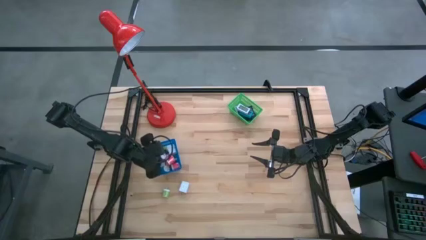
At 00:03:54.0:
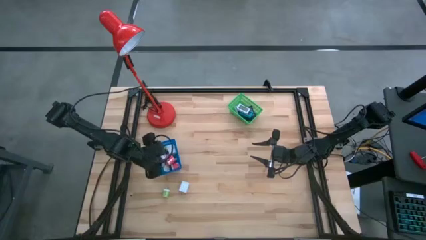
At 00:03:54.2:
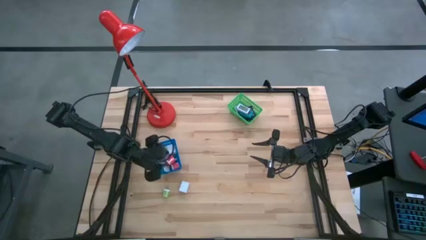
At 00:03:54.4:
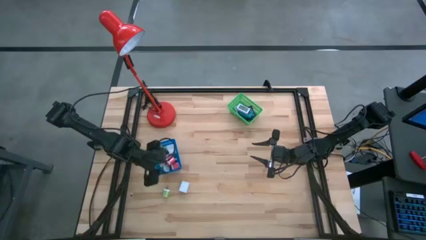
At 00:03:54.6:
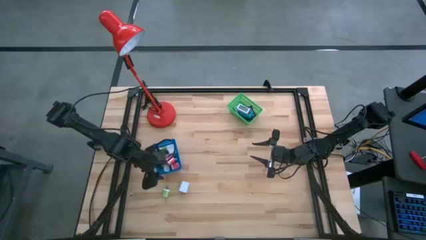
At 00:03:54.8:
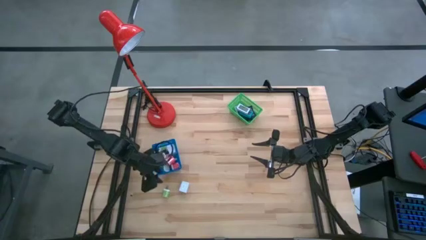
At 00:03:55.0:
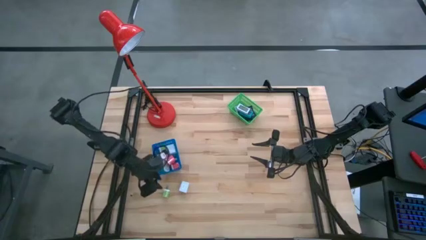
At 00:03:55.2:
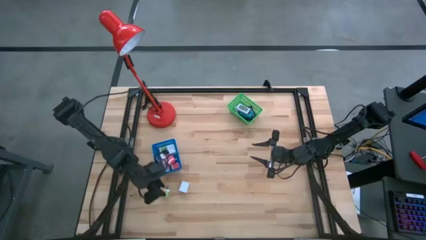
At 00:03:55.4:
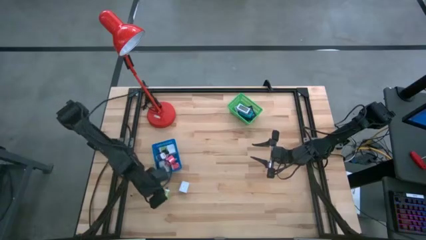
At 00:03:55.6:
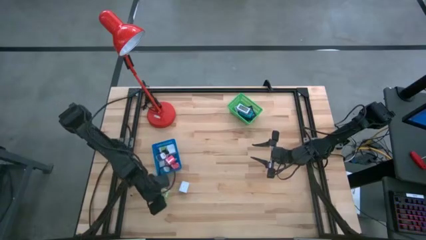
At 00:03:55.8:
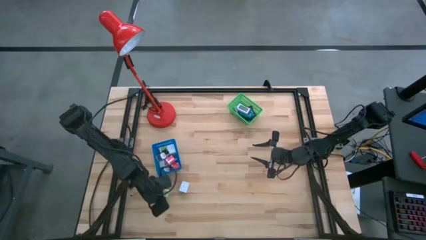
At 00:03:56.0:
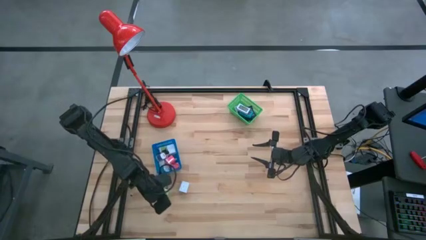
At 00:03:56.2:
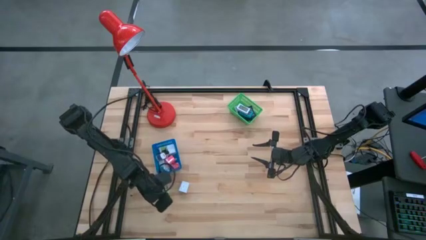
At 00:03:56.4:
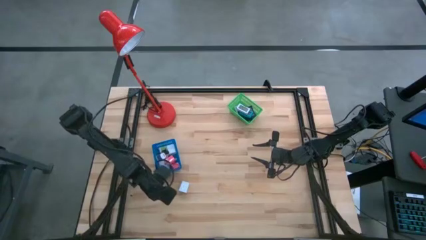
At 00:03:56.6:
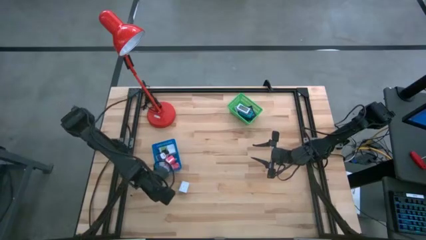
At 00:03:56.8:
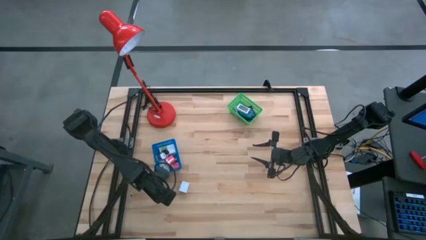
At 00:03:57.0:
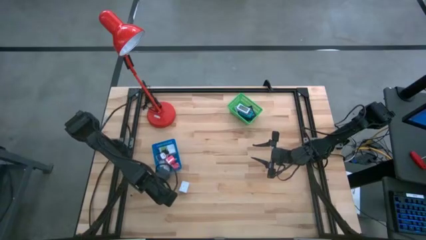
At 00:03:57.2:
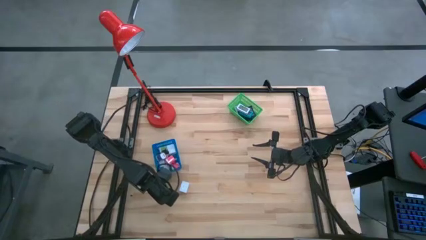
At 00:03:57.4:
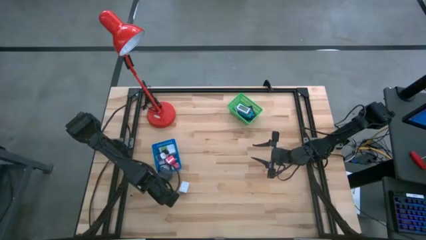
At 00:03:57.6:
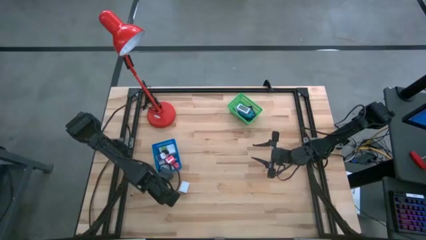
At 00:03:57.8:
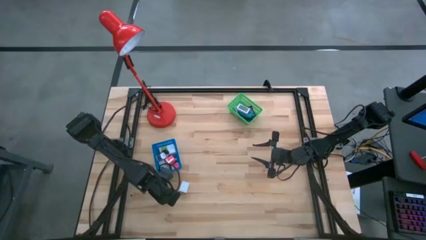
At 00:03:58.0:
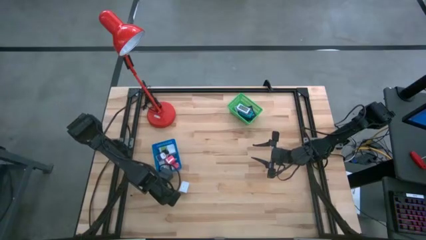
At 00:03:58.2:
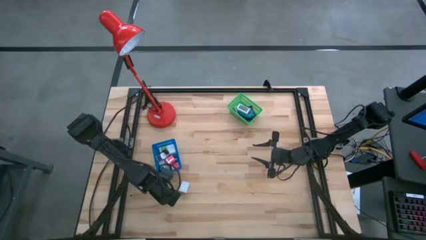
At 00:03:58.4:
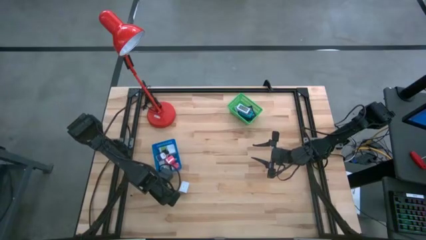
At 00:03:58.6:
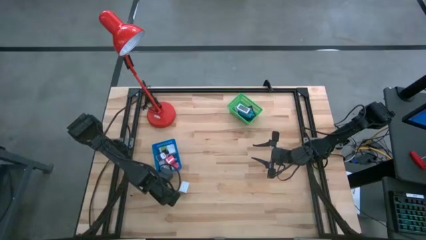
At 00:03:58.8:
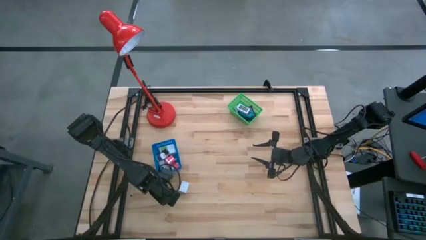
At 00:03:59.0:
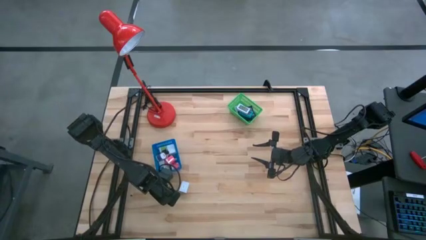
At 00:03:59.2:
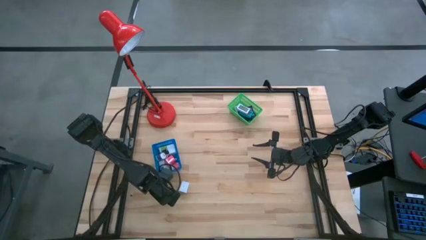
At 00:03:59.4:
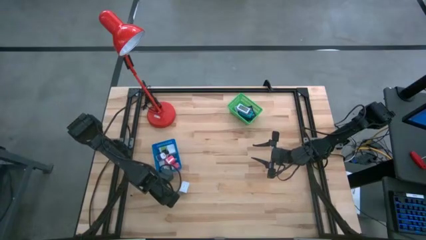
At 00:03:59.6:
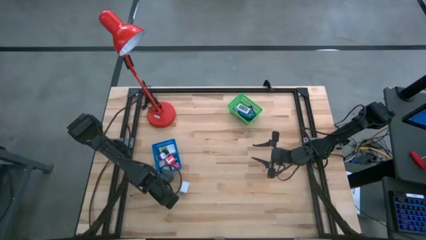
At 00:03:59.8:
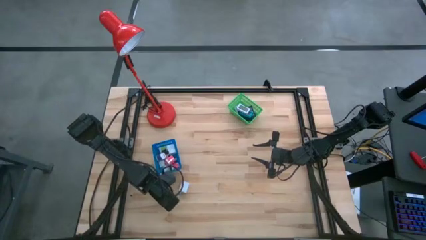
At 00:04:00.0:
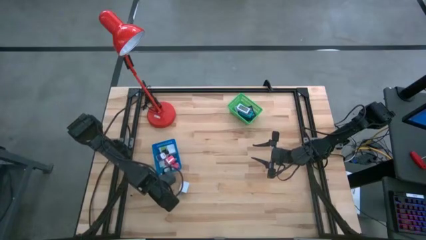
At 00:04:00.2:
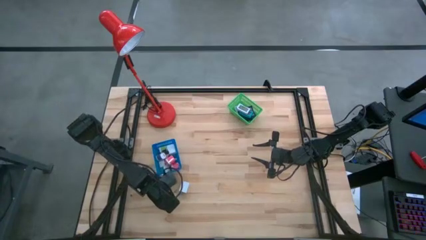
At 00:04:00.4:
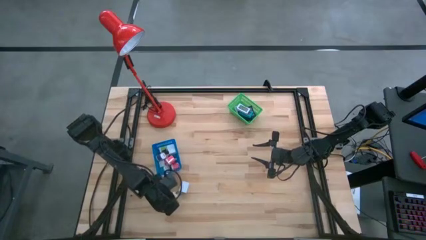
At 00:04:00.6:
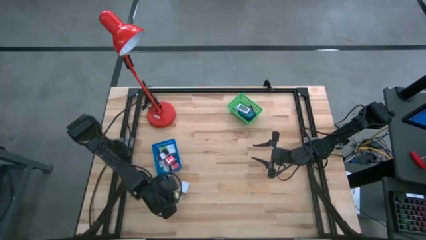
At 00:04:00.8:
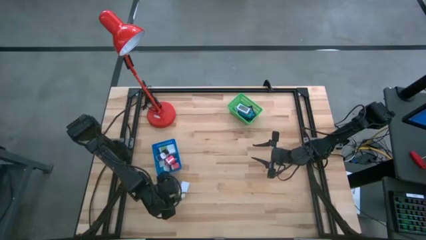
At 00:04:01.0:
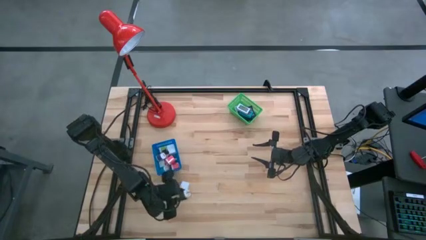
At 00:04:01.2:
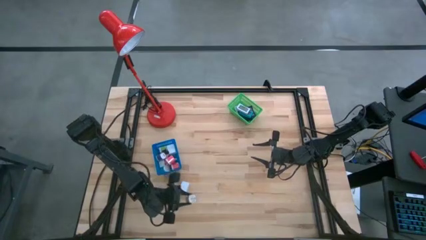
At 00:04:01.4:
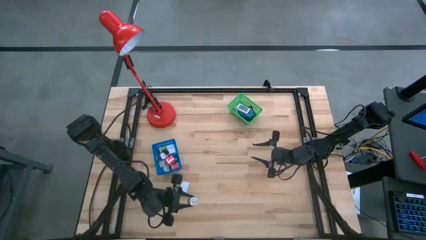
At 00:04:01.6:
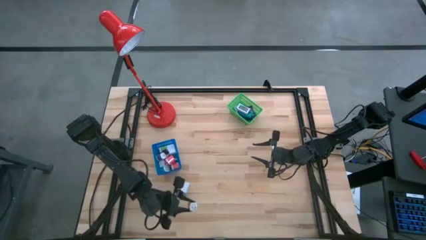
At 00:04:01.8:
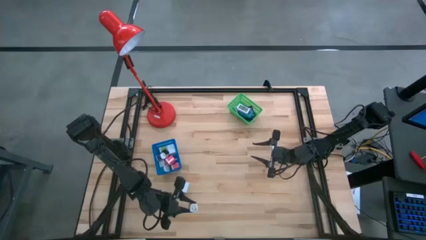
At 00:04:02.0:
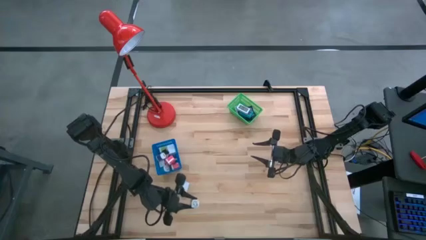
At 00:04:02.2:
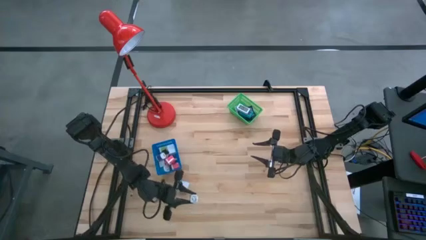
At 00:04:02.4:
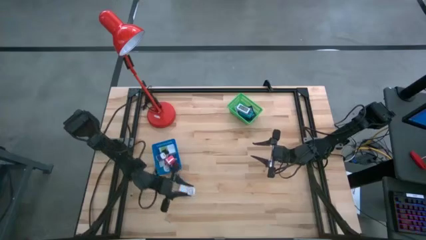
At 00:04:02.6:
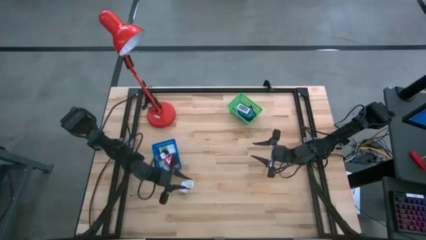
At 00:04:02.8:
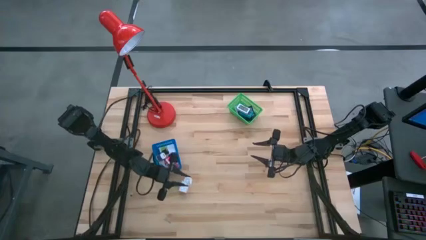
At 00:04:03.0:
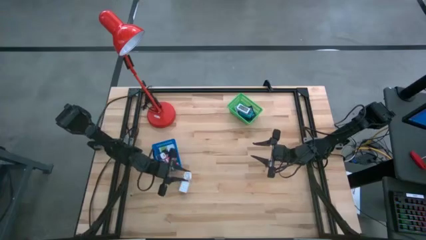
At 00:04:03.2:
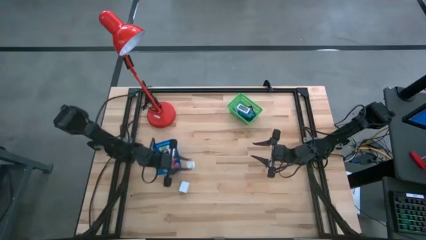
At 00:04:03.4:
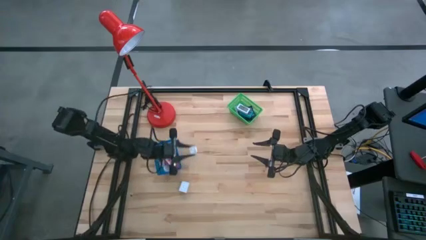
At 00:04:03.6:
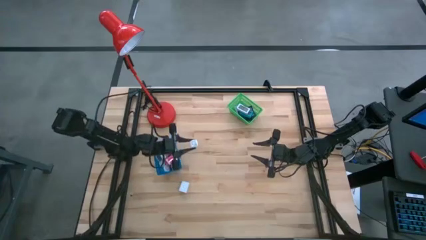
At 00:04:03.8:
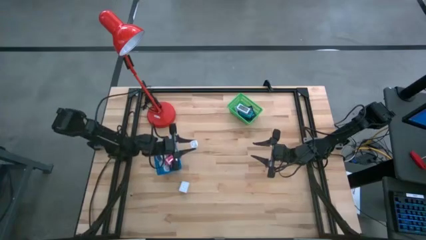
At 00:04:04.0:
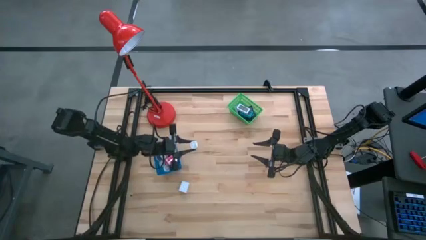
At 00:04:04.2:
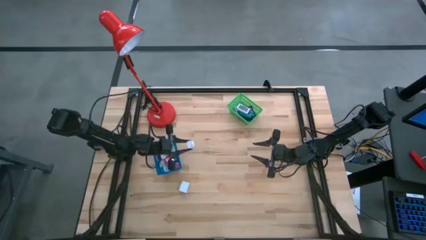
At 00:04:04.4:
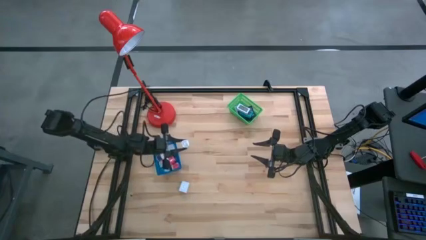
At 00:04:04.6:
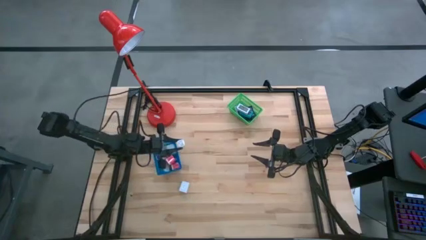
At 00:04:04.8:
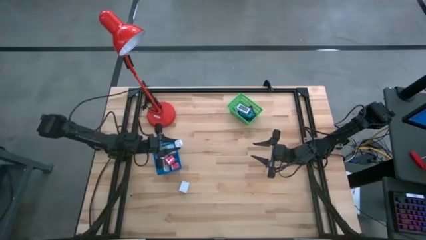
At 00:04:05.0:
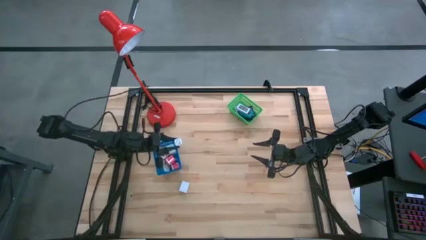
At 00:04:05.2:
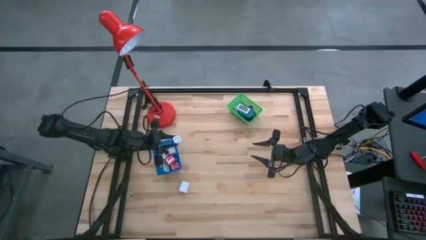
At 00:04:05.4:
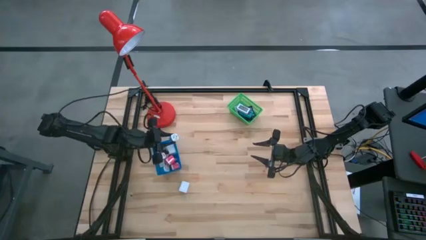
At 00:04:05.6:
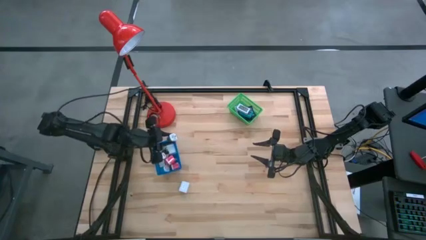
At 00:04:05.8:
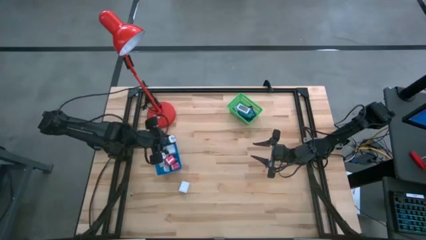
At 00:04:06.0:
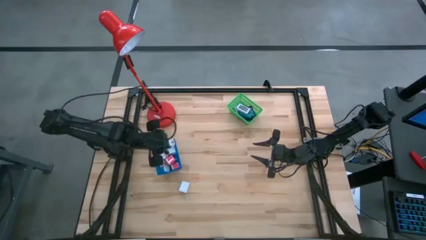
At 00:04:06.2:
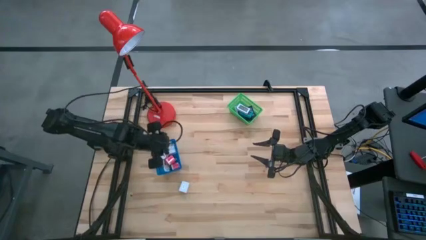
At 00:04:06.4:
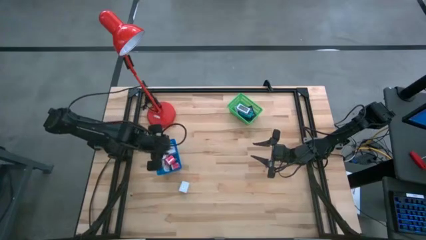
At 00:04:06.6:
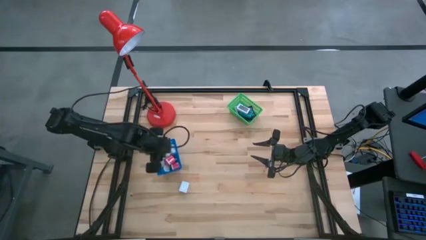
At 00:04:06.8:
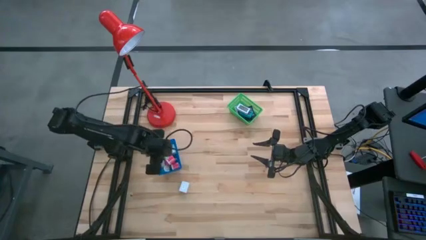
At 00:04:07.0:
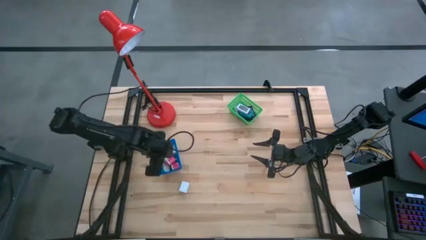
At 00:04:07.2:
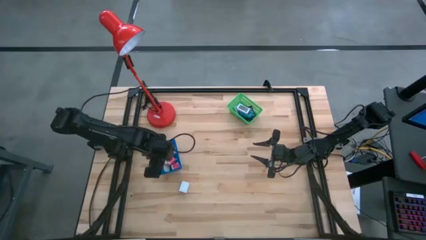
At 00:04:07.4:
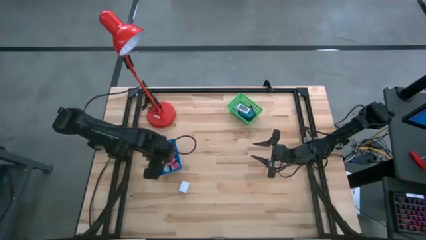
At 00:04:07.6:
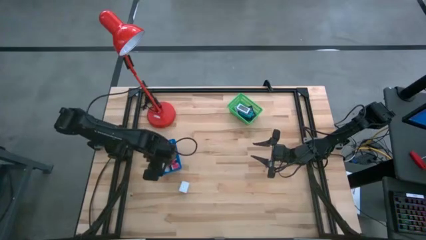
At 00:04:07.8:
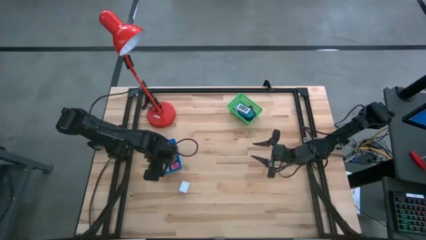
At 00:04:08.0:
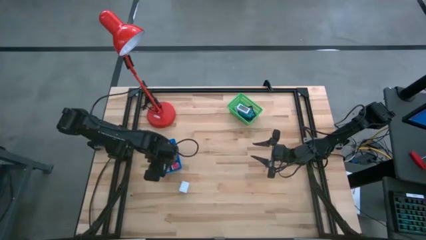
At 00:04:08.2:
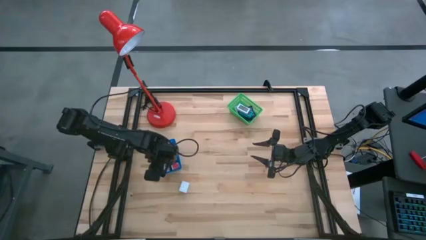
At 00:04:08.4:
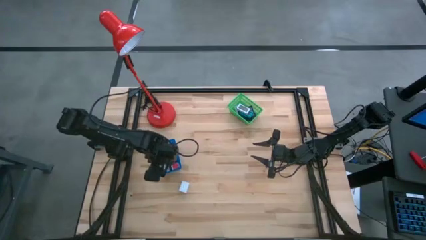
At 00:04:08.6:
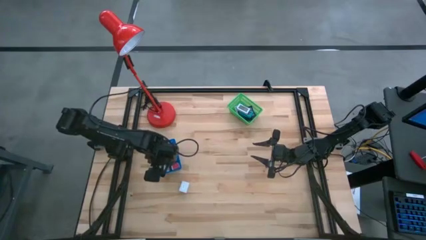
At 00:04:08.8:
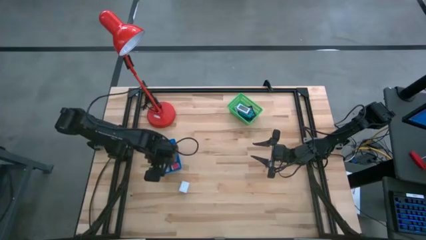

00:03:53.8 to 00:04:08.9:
Task: Pick & Place Office items
Put the green charger adapter into the blue basket
